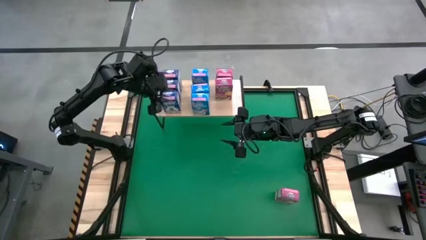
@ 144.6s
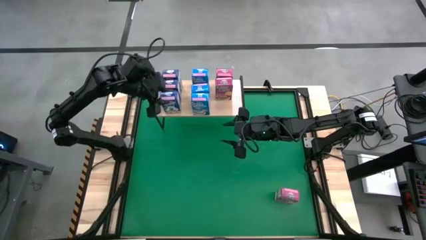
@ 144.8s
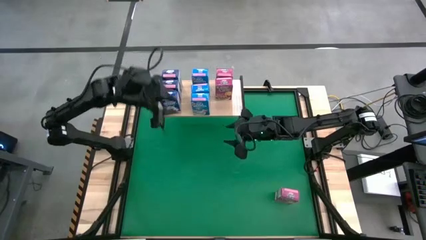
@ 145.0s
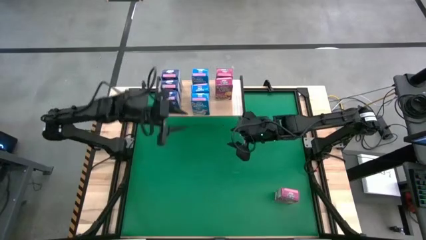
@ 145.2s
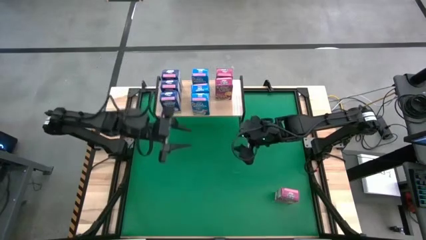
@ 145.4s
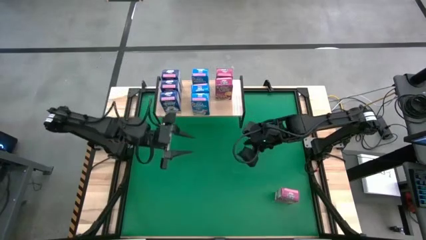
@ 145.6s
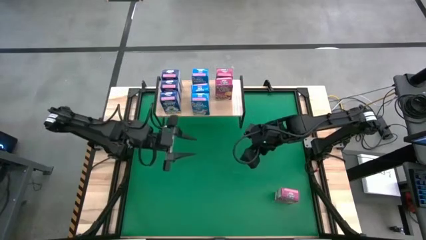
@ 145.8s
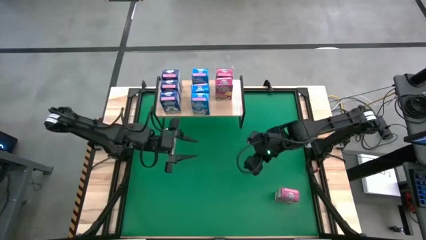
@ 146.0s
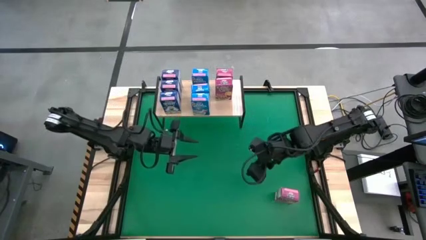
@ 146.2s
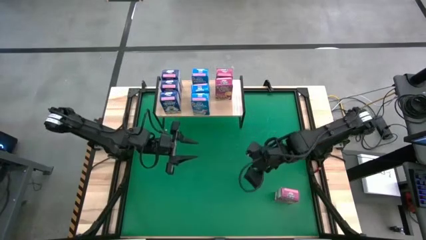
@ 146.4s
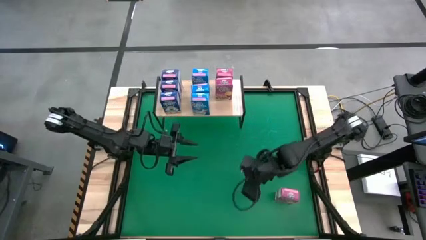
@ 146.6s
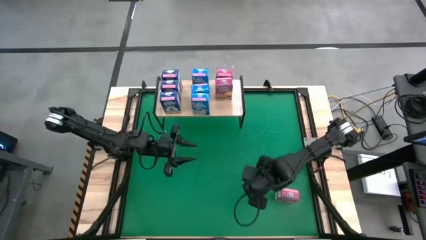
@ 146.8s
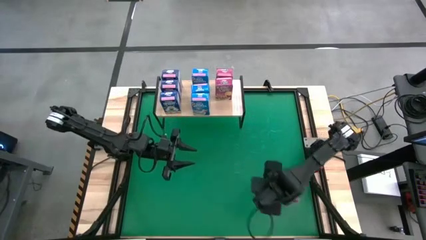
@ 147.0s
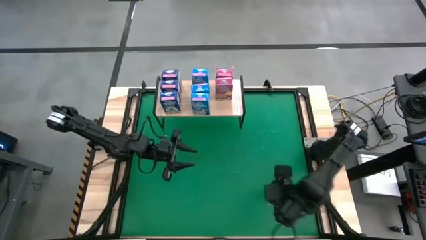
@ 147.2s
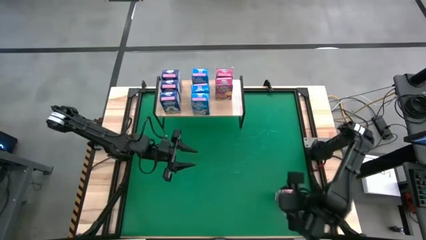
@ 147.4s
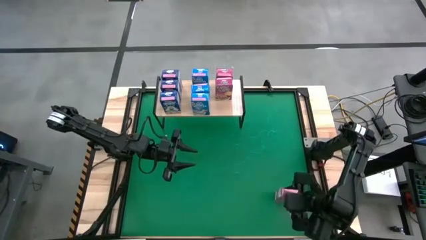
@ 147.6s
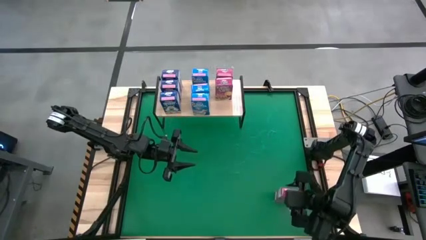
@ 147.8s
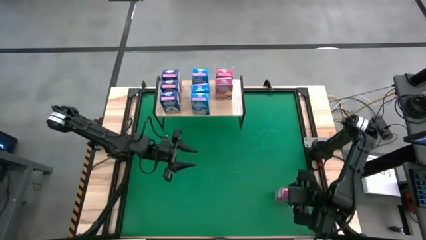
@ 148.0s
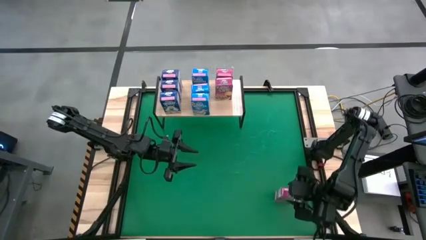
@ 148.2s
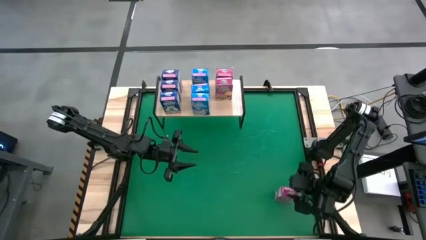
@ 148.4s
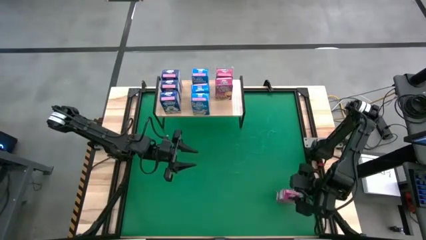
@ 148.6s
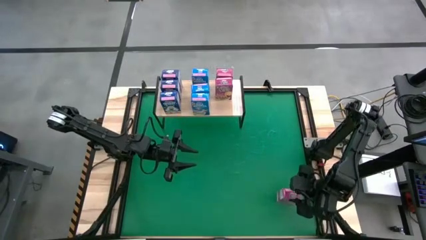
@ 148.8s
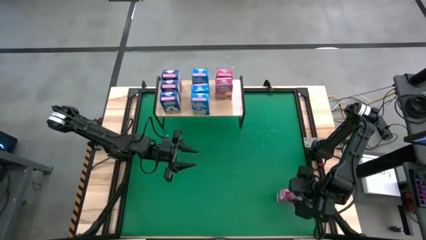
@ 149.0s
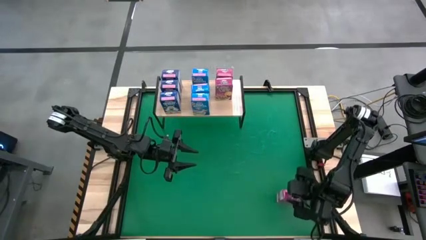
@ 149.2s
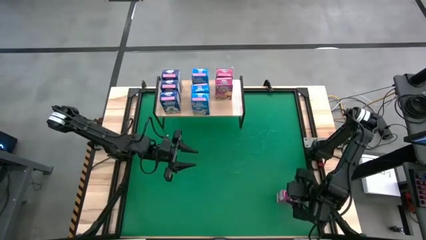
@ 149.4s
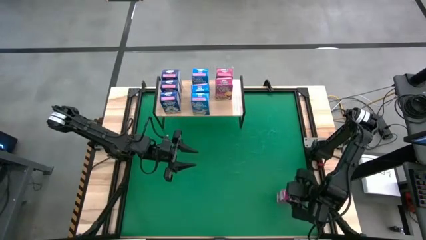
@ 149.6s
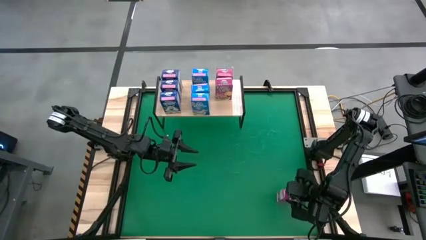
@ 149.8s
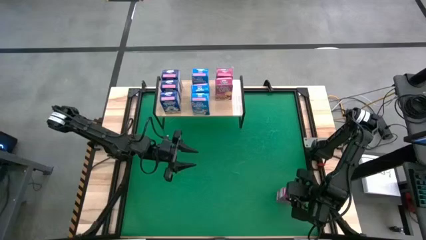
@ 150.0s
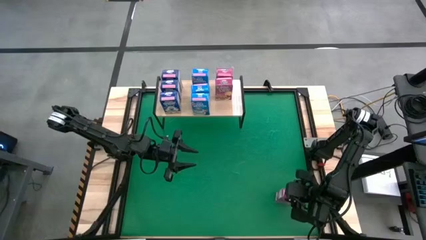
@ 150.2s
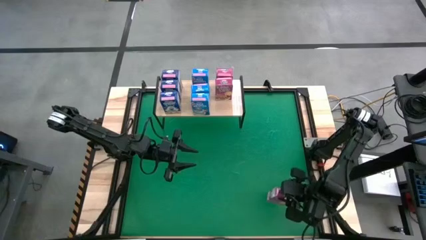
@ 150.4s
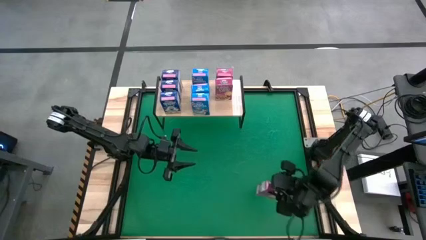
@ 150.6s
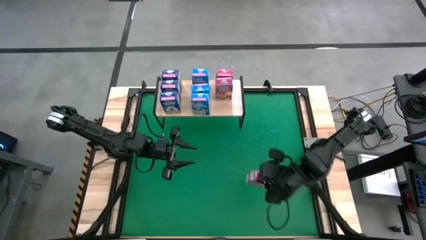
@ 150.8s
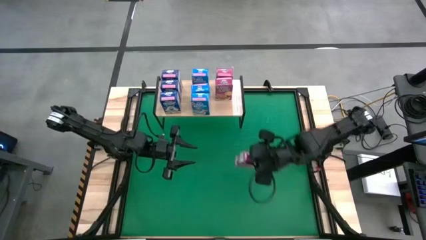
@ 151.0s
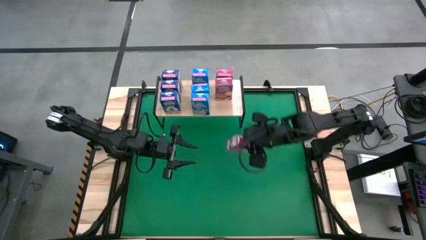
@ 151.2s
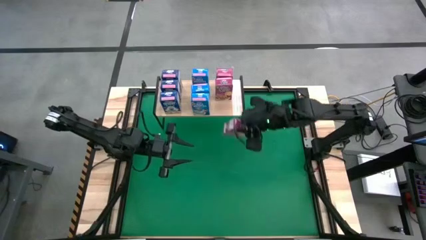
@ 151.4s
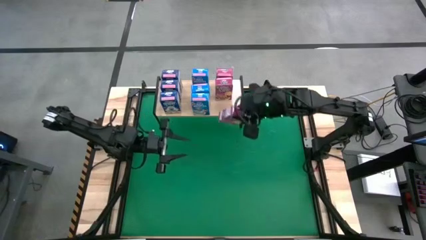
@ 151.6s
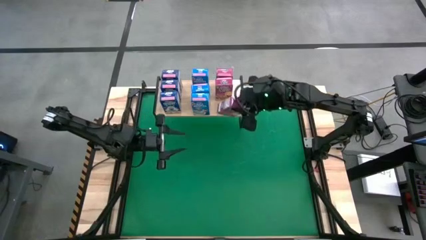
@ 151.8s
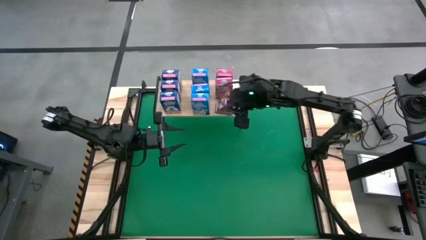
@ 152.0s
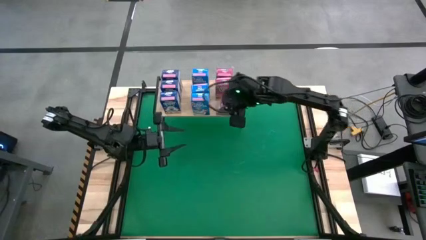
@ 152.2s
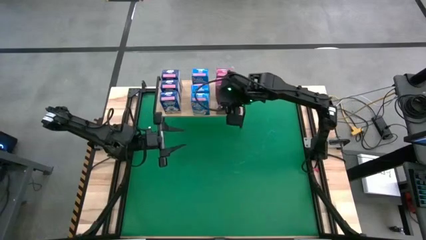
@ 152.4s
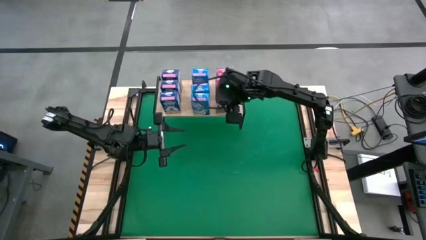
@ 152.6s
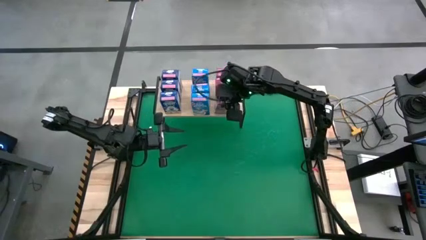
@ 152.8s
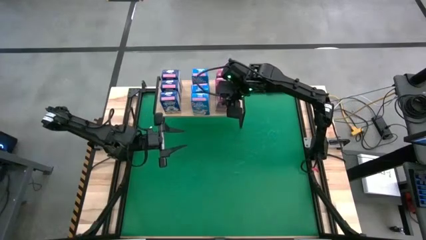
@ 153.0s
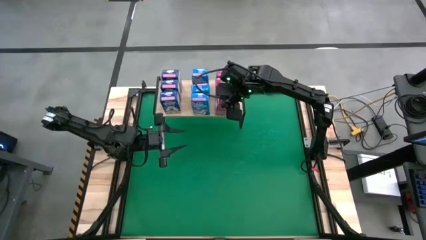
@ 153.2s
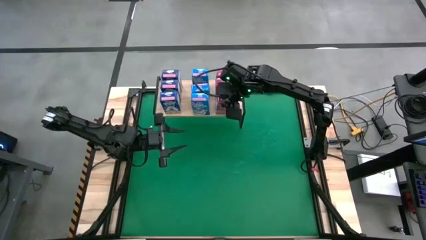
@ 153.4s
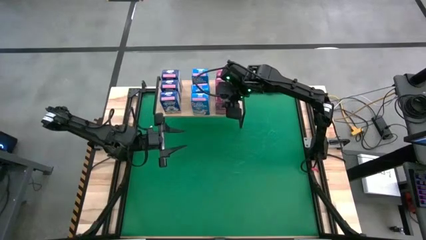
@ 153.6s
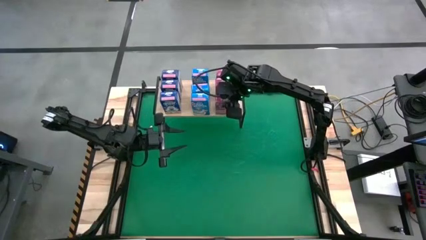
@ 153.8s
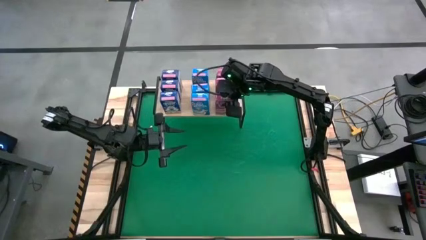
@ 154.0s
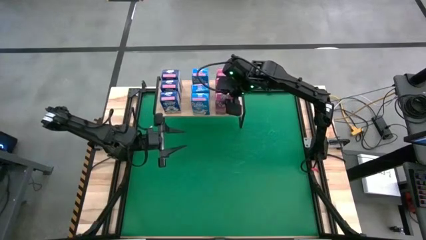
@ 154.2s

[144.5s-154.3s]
Task: Stack cereal on shelf
Put the pink cereal box on the shelf aligned with the other pink boxes

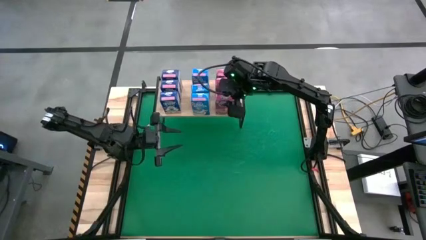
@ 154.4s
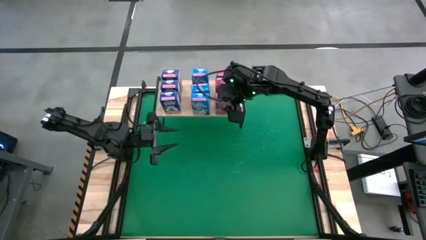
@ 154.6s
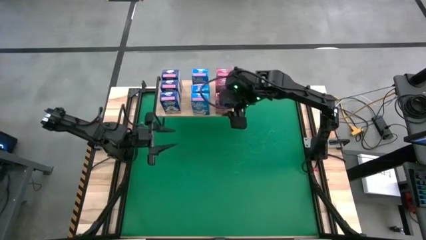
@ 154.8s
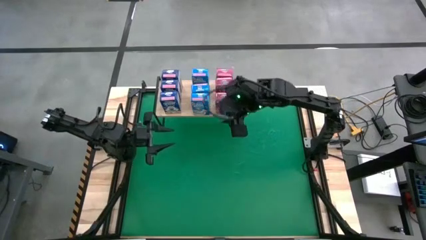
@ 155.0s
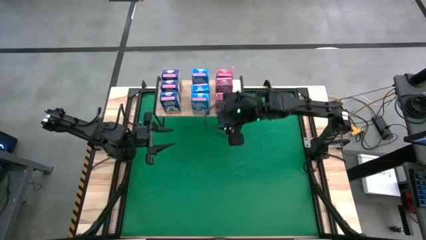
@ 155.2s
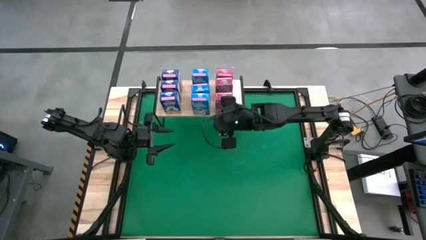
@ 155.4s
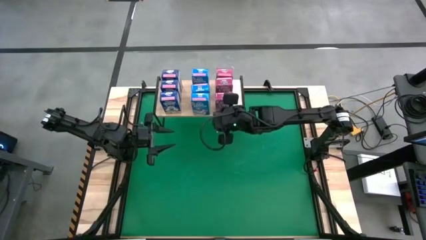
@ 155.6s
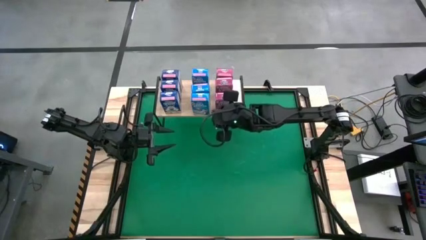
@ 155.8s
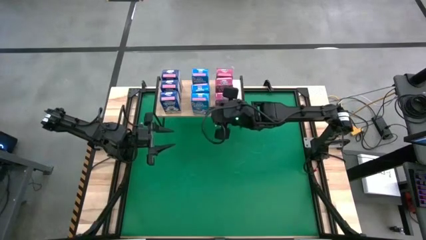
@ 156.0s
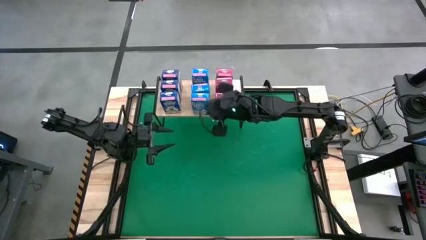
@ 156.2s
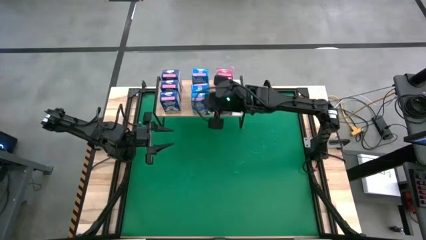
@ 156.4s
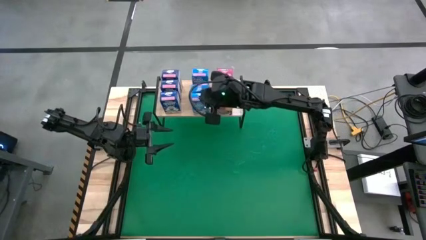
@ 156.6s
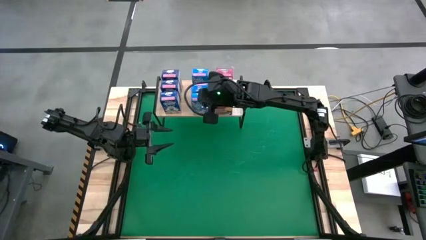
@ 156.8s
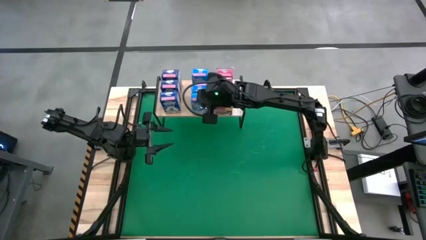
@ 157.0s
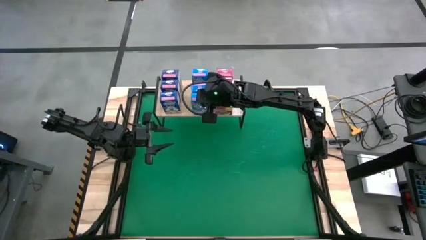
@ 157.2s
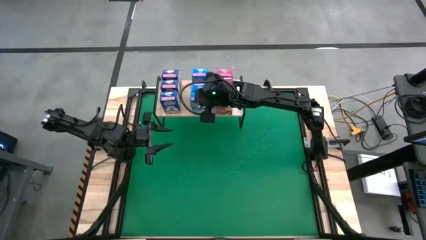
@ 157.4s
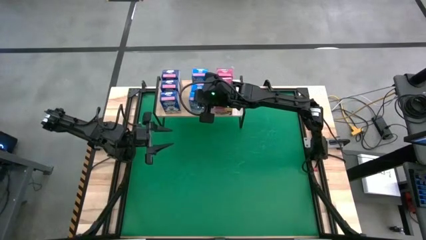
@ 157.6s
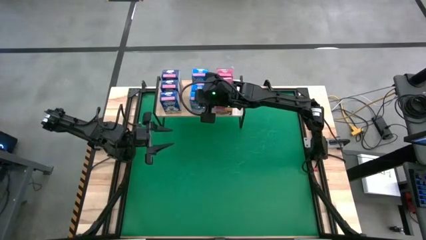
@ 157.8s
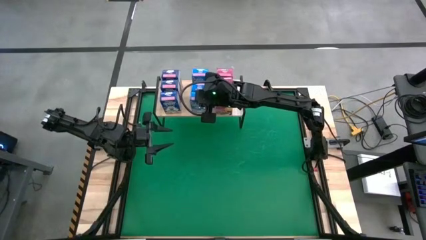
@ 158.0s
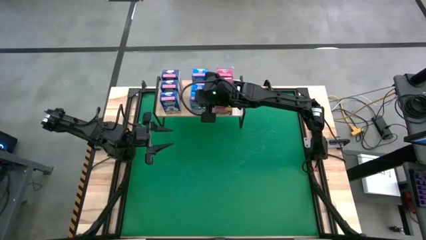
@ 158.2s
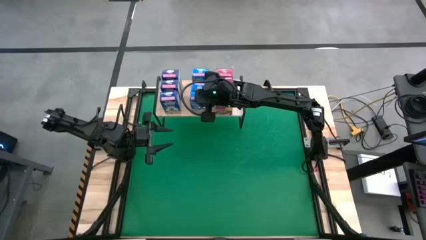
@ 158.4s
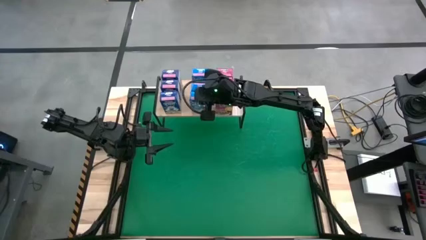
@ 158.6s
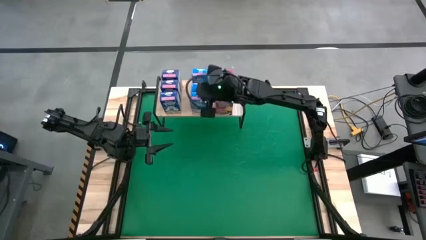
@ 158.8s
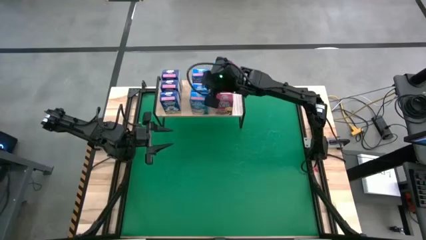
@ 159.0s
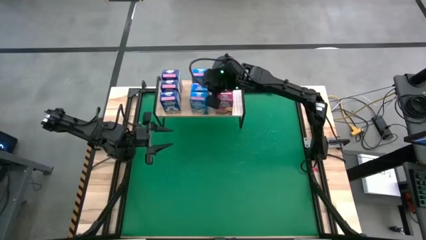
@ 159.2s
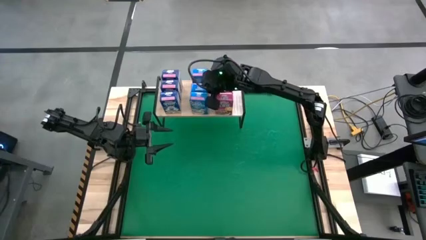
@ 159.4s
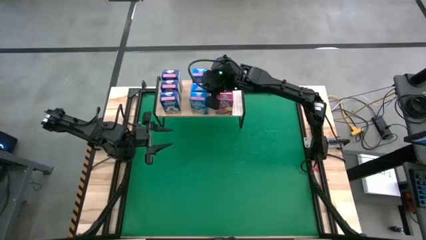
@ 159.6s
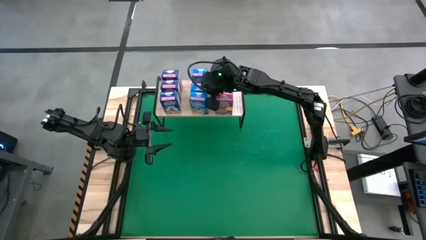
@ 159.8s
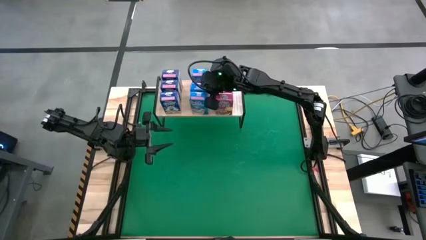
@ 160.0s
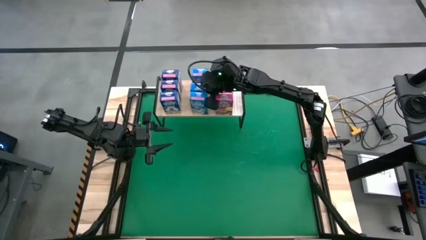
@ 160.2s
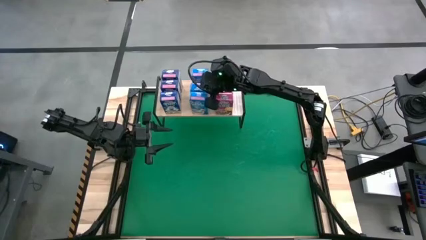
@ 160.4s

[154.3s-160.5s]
Adjust the light blue cereal boxes

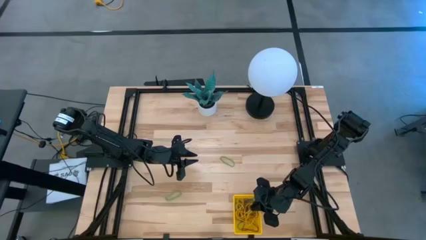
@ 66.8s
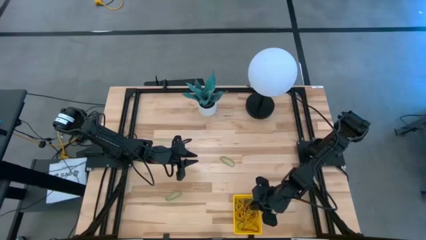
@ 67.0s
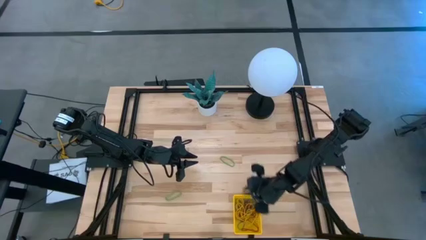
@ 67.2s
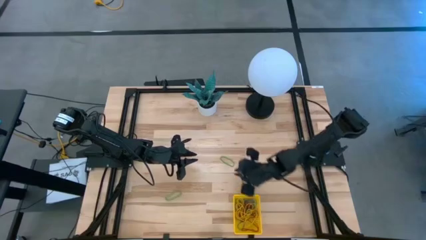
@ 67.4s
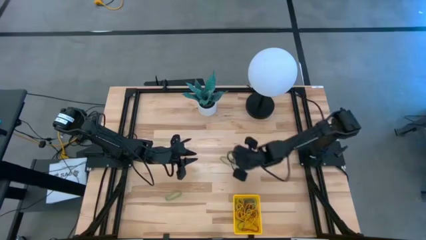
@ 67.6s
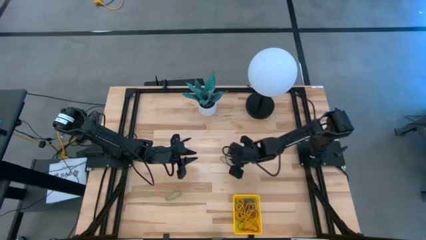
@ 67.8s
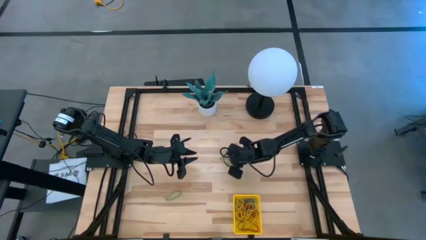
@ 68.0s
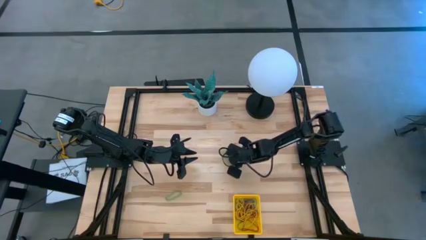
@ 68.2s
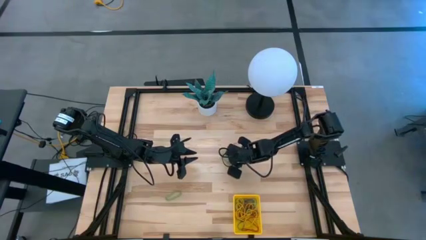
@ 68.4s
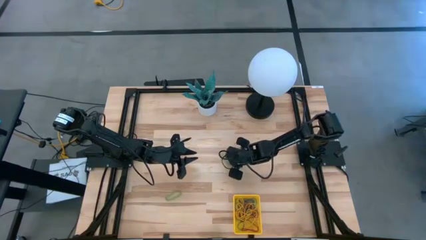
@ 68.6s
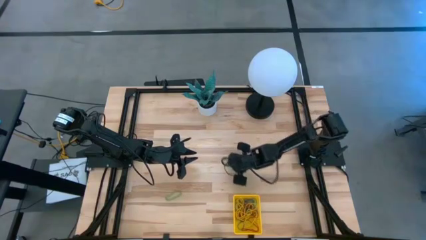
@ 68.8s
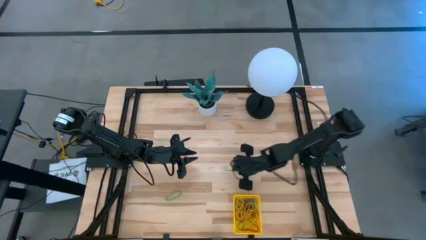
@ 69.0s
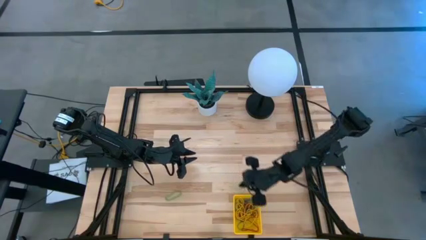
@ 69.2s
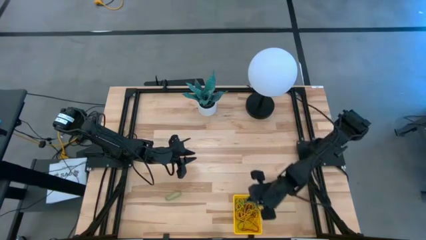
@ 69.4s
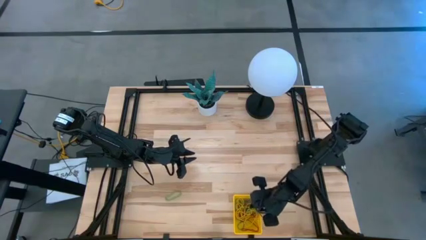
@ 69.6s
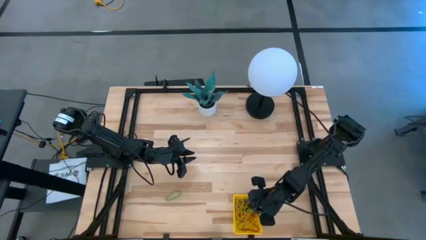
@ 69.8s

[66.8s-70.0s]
Task: Pick and place rubber bands into bin
Put the green rubber band into the yellow basket
